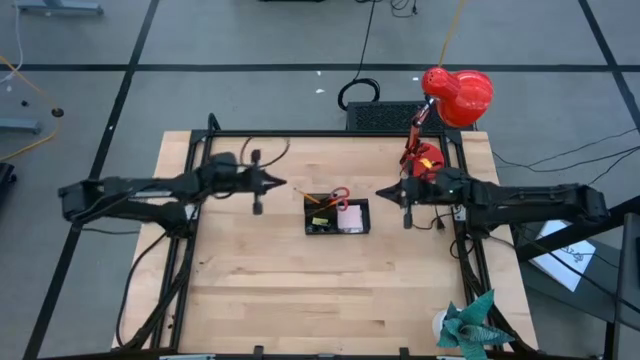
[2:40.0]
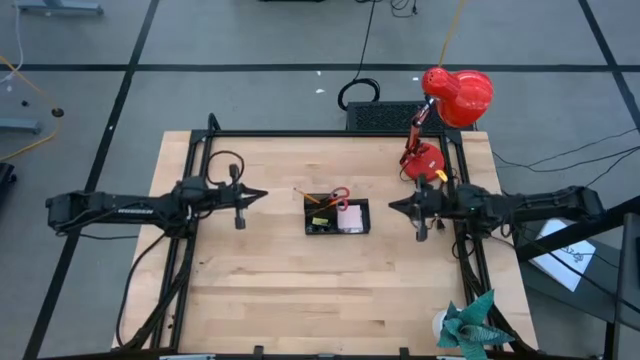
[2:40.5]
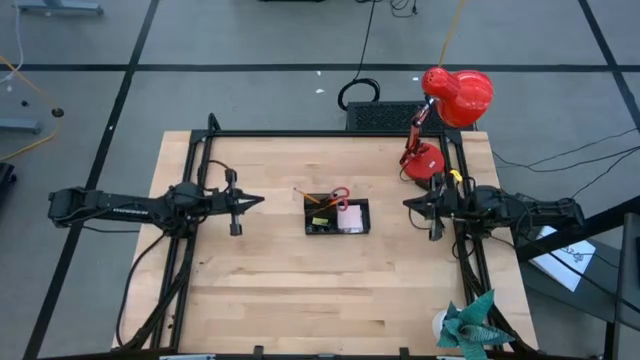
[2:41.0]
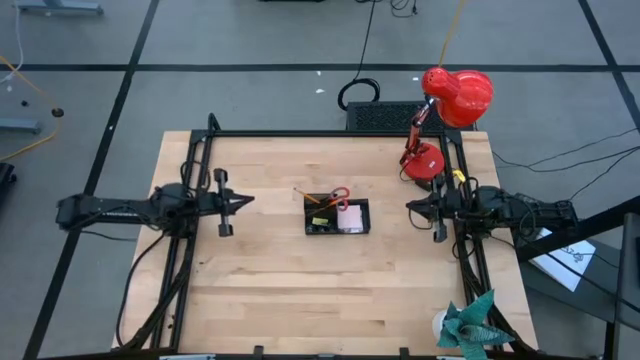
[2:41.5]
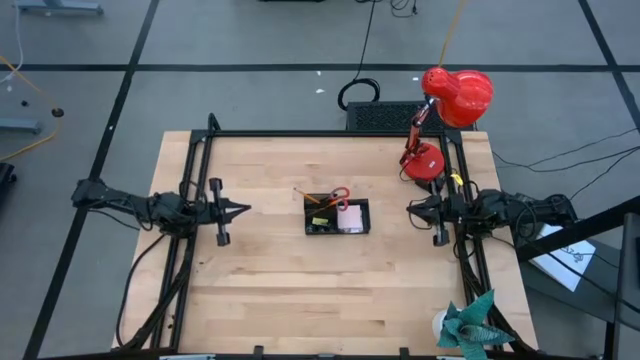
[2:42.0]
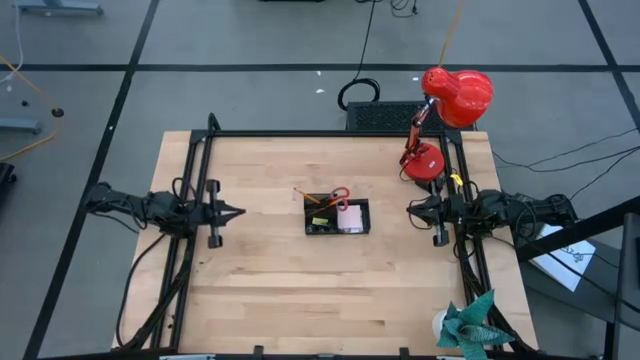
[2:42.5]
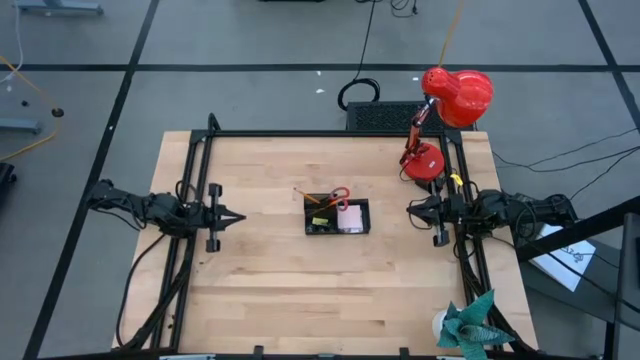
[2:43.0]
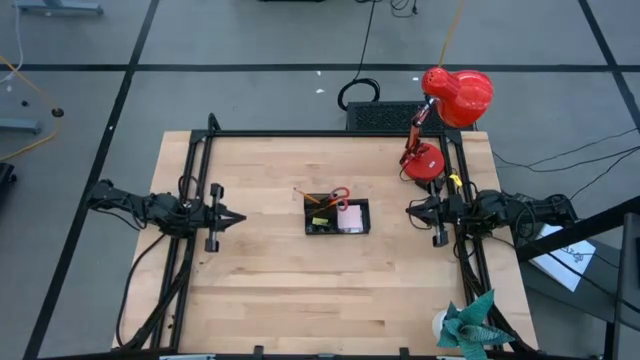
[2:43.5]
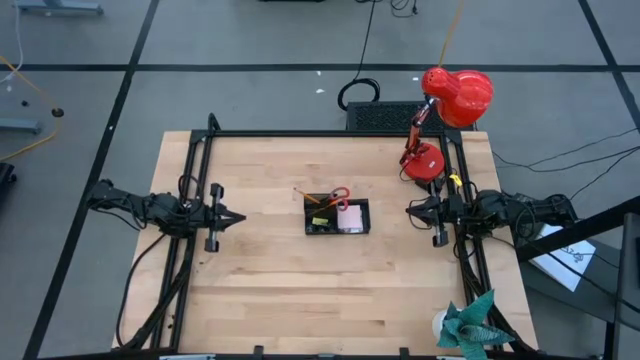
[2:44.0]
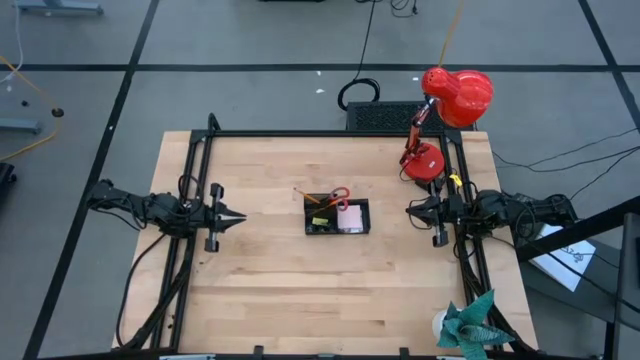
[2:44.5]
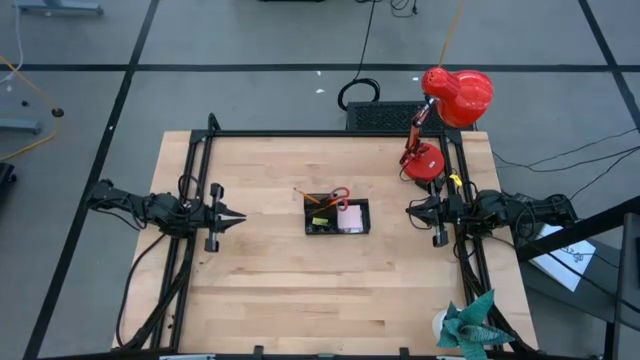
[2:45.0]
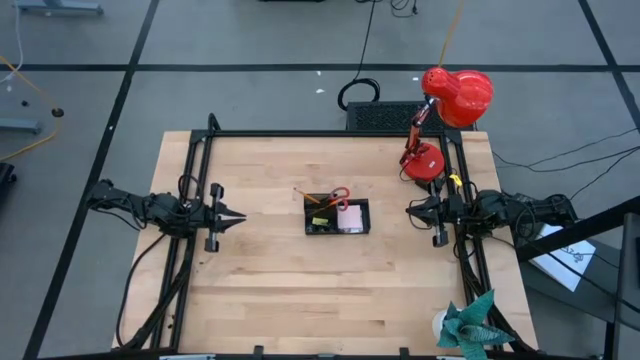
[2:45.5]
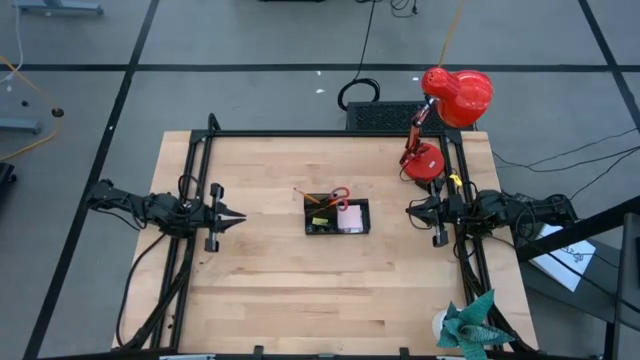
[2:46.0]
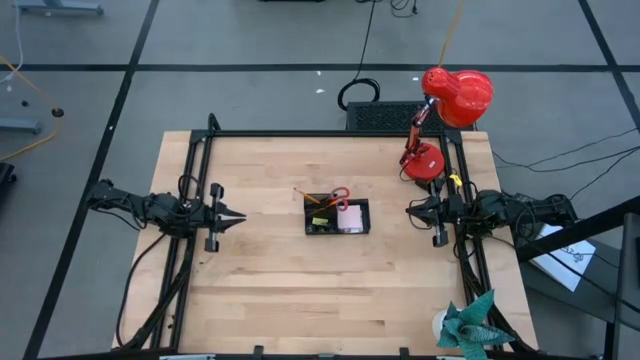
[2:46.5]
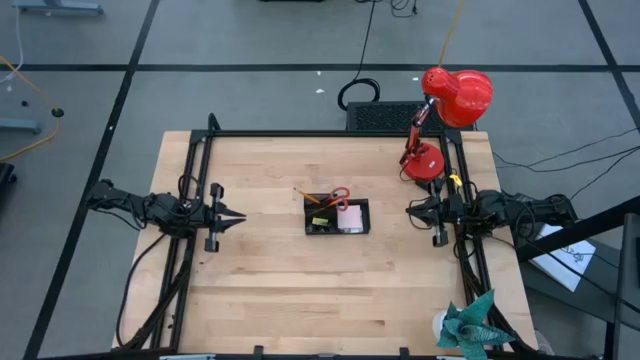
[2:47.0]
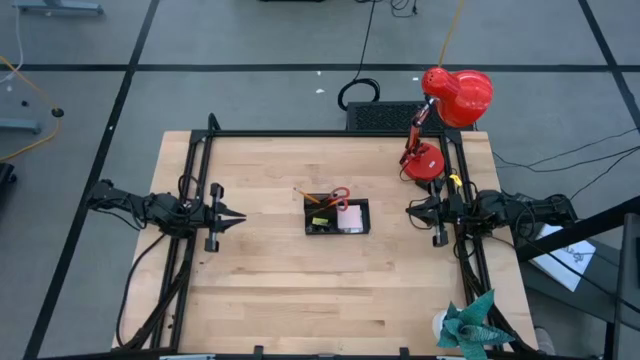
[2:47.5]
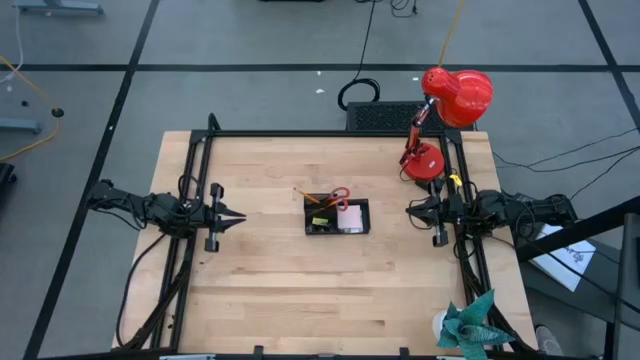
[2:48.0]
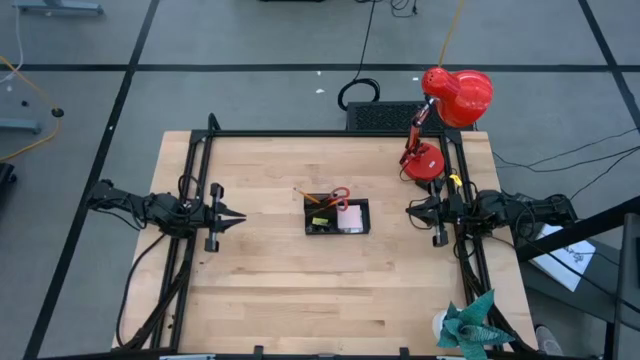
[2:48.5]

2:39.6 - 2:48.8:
Task: Pick and place office supplies into organizer
Return to Home Position

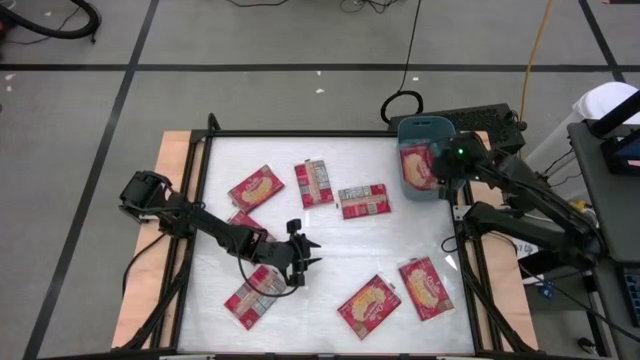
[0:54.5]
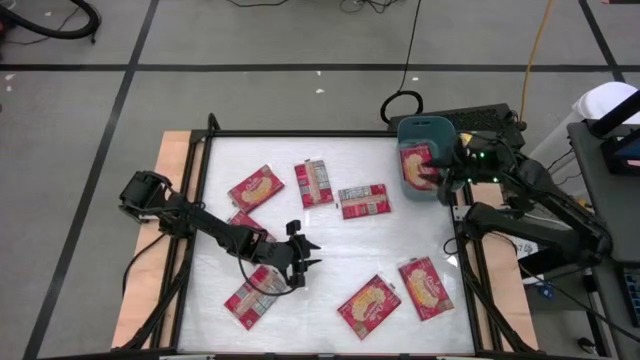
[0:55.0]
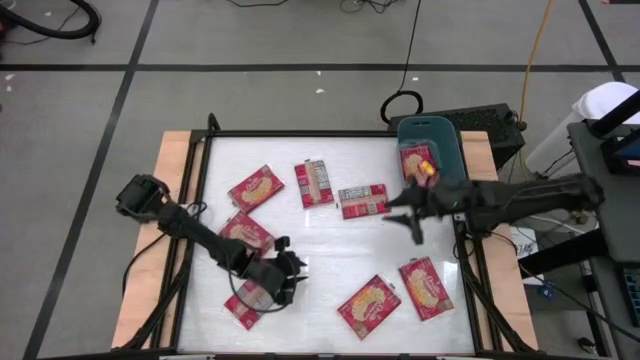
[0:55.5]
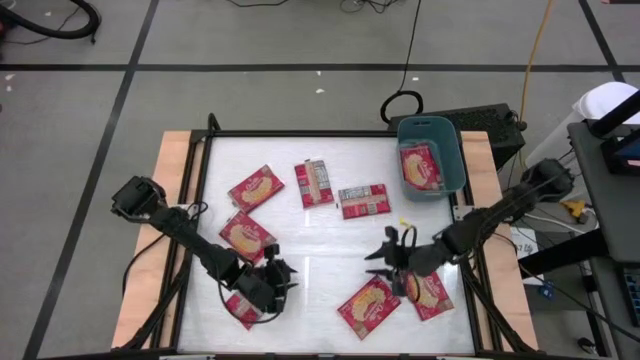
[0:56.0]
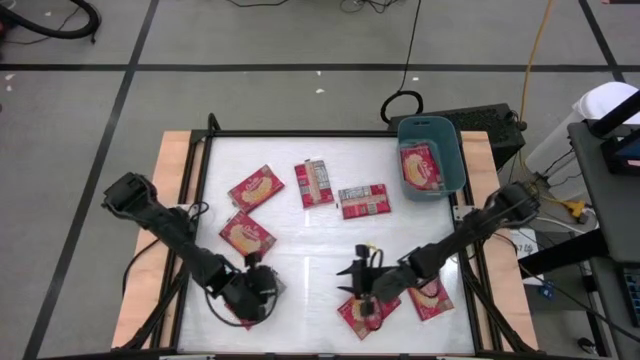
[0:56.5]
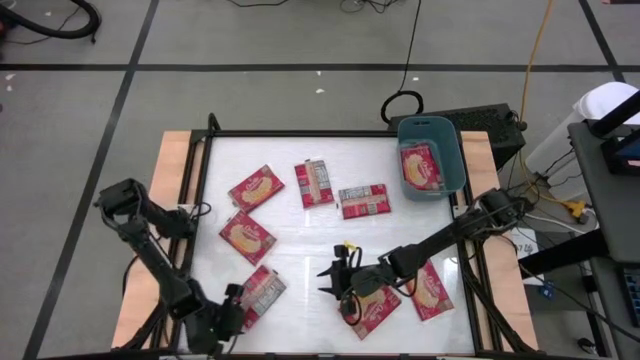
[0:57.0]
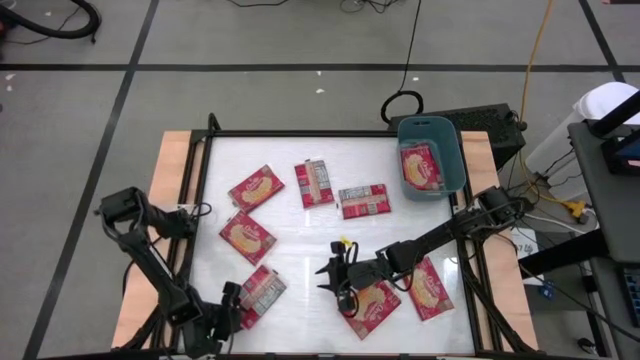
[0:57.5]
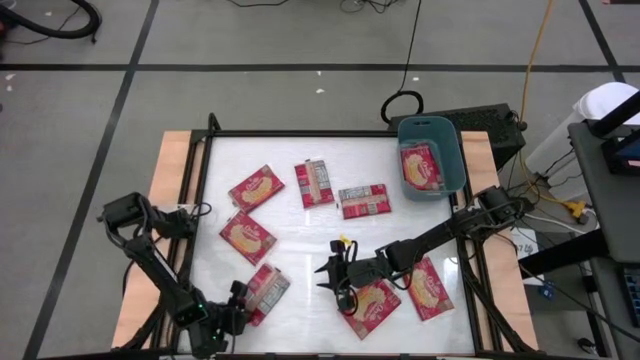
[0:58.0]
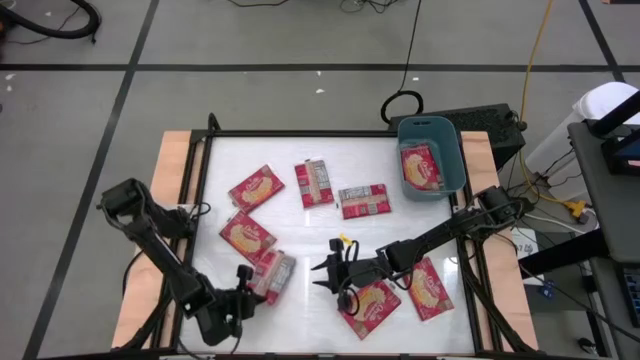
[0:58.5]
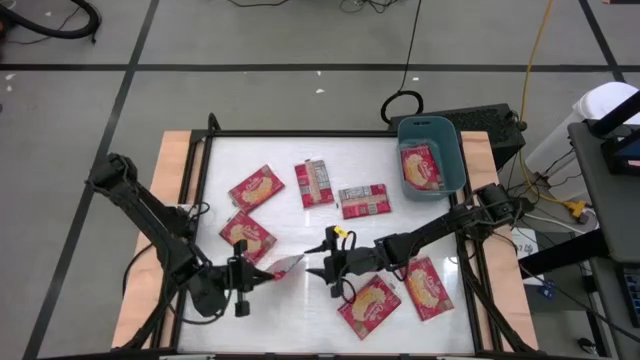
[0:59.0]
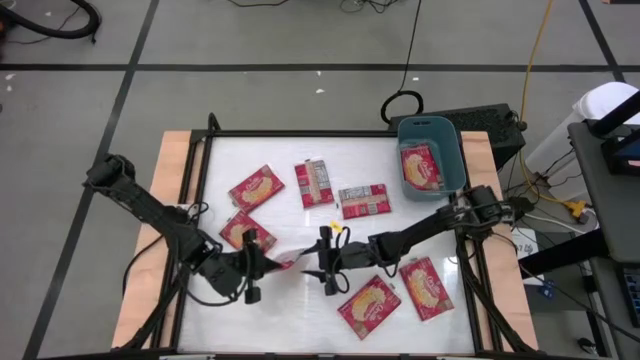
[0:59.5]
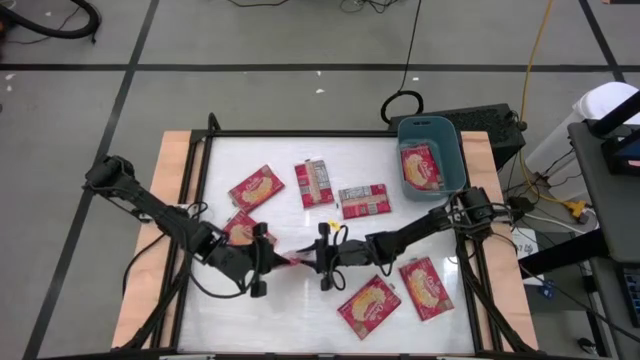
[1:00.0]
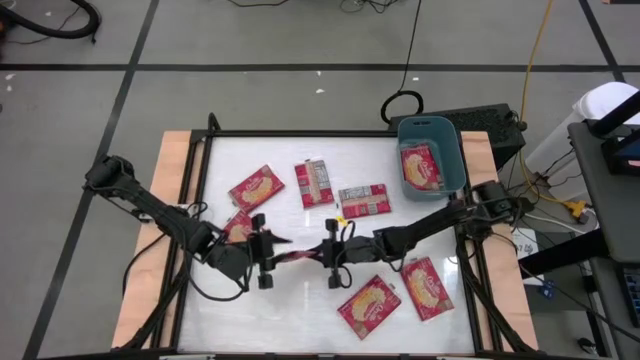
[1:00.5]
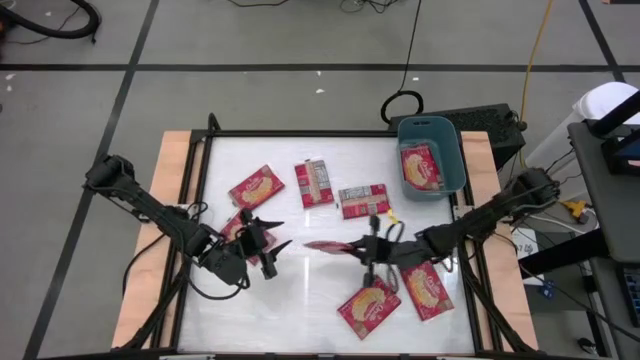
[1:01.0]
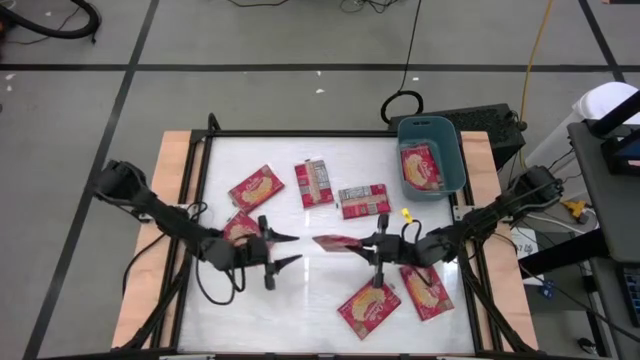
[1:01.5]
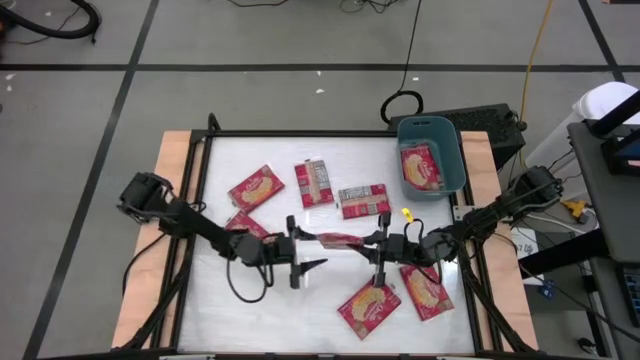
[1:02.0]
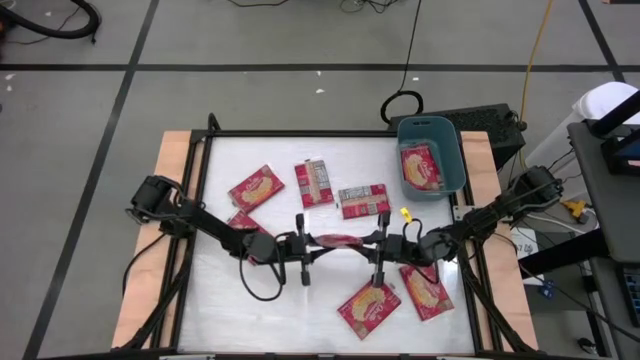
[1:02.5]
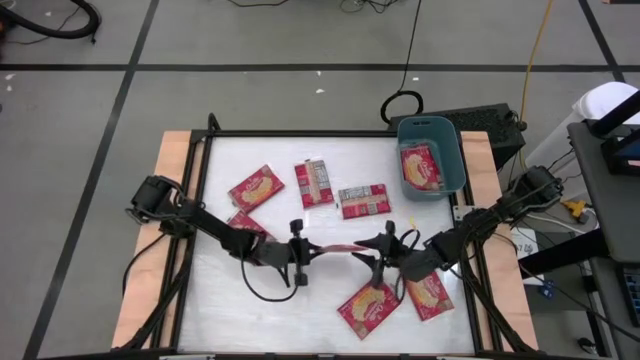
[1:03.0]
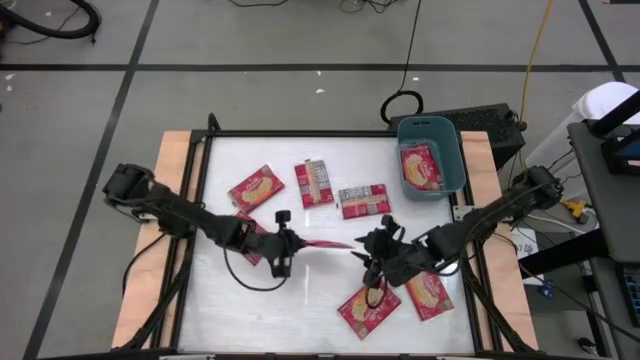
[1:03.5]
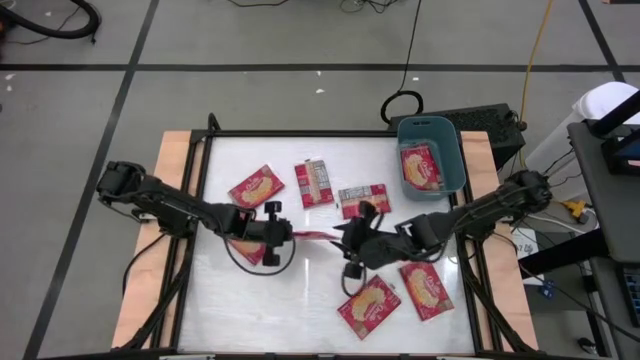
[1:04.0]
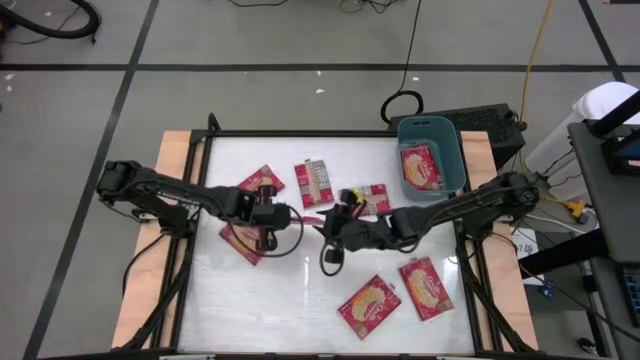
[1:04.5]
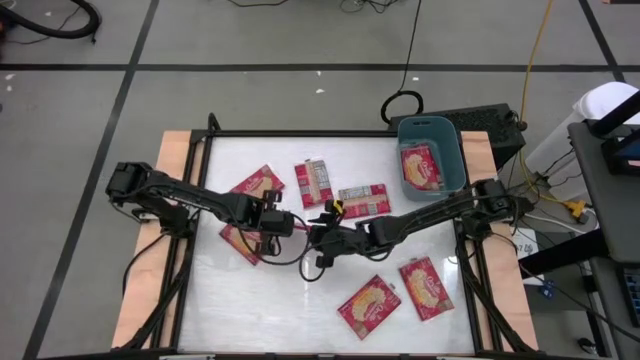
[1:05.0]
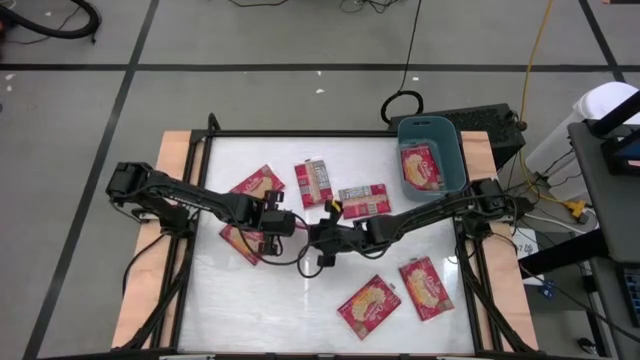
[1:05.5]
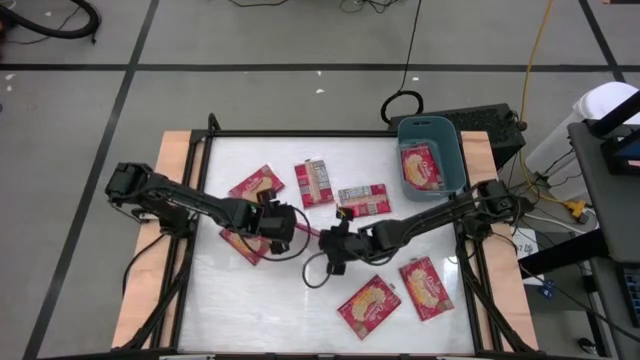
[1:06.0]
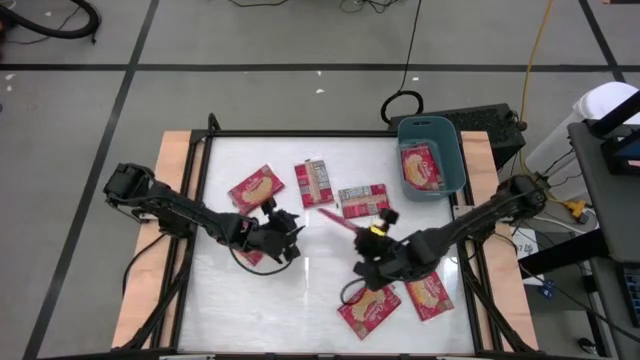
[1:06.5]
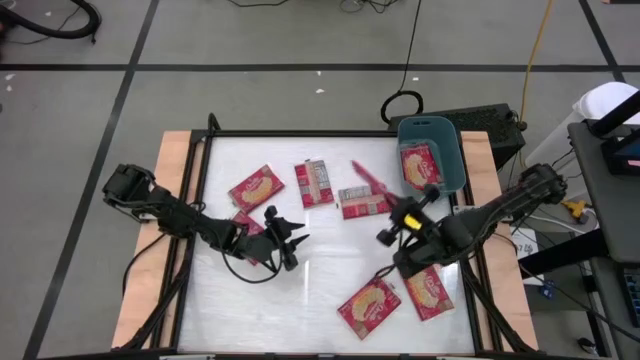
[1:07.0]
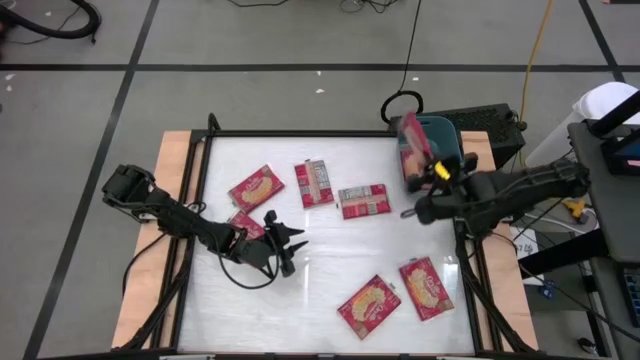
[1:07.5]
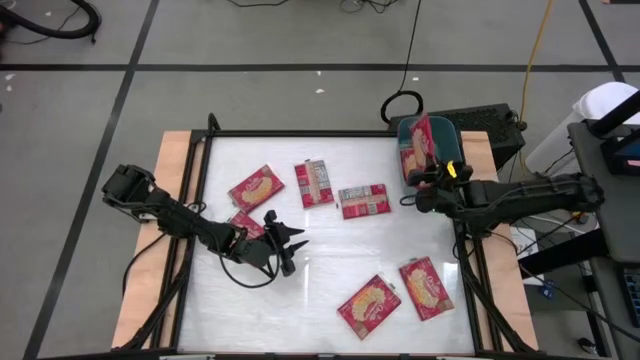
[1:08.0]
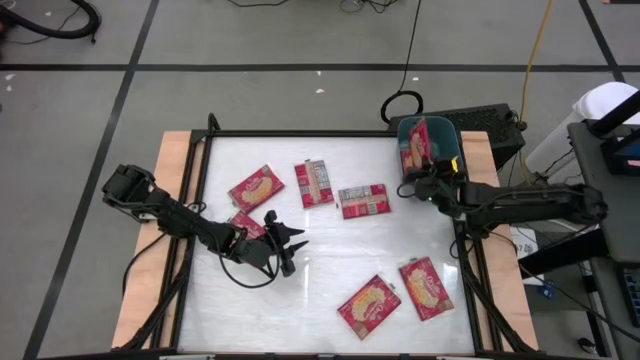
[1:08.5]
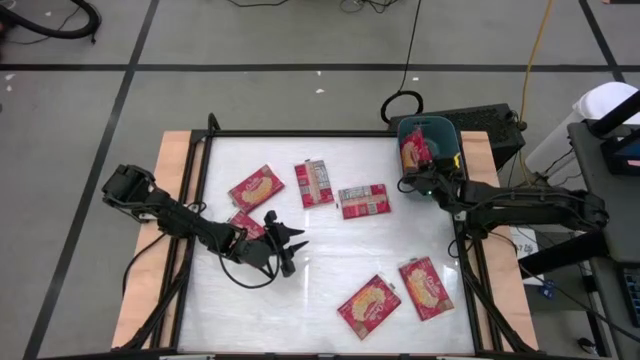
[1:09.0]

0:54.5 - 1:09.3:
Task: Sort popcorn bags into baskets
Put the red popcorn bag into the blue bin
